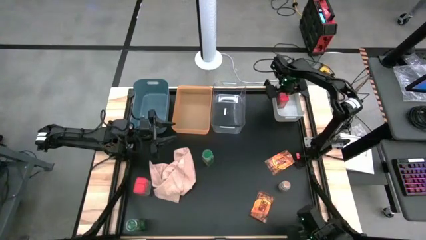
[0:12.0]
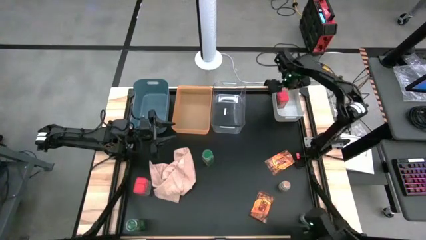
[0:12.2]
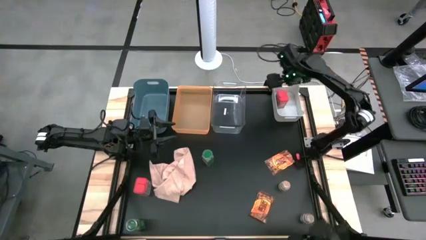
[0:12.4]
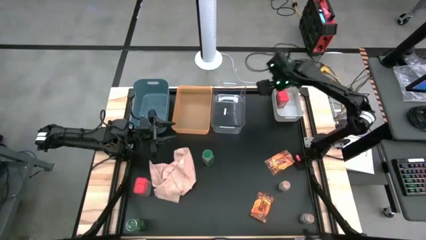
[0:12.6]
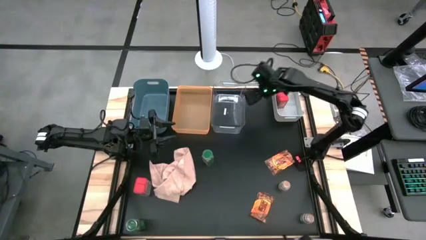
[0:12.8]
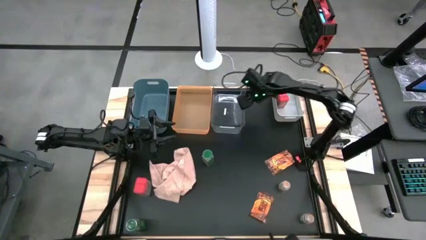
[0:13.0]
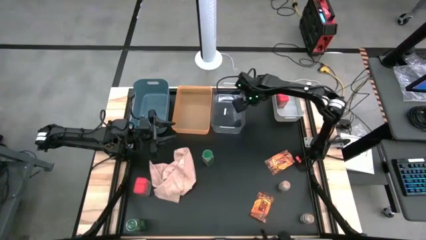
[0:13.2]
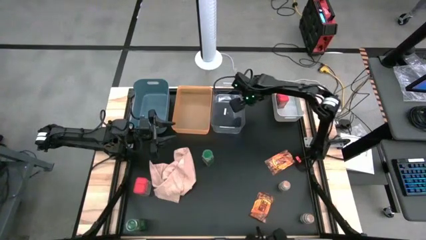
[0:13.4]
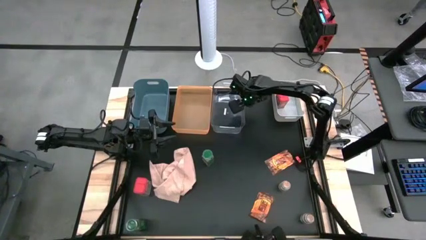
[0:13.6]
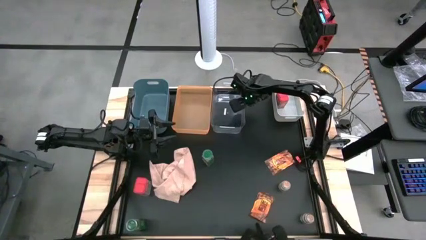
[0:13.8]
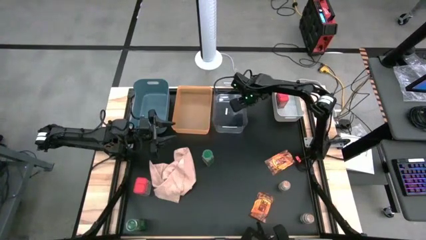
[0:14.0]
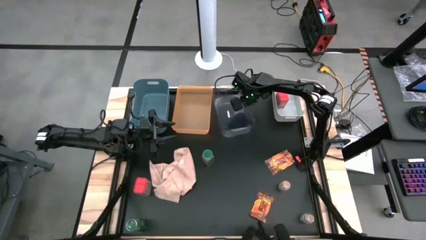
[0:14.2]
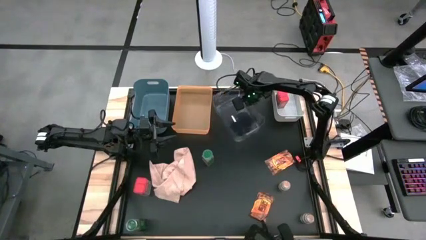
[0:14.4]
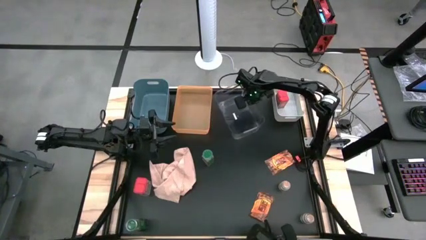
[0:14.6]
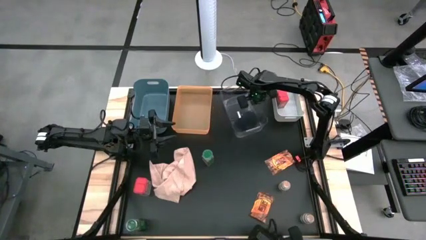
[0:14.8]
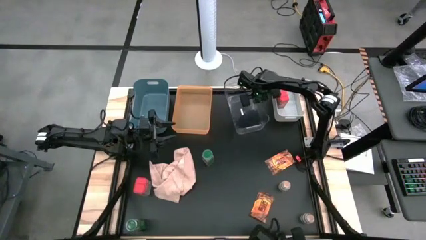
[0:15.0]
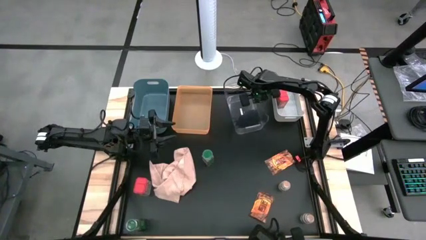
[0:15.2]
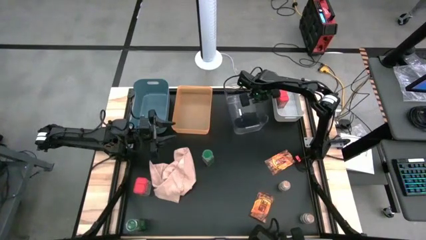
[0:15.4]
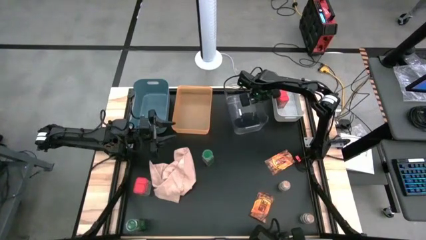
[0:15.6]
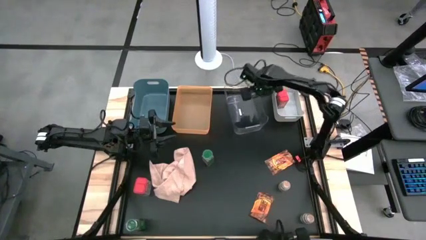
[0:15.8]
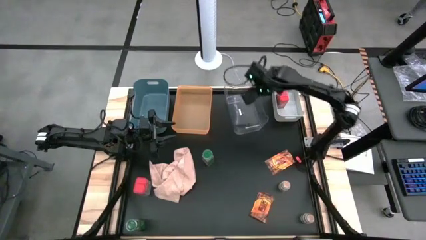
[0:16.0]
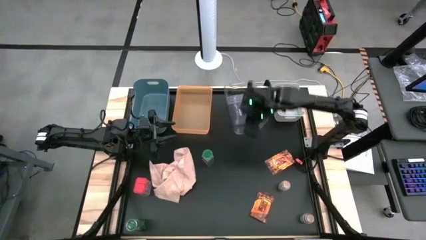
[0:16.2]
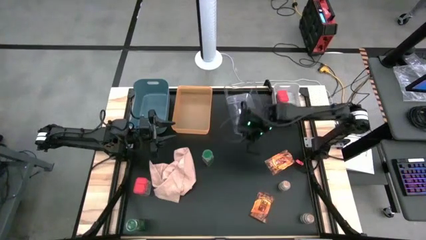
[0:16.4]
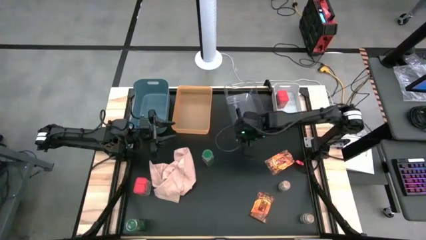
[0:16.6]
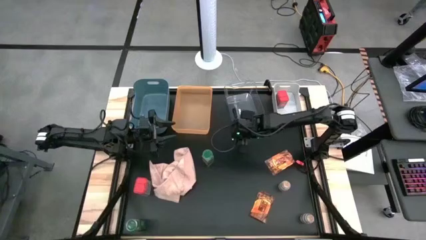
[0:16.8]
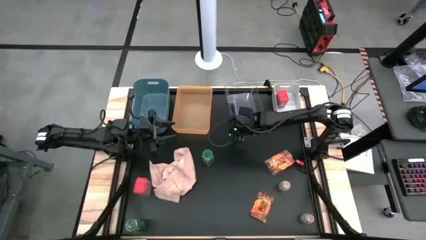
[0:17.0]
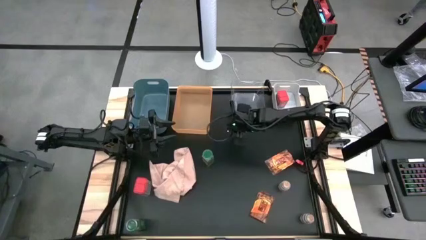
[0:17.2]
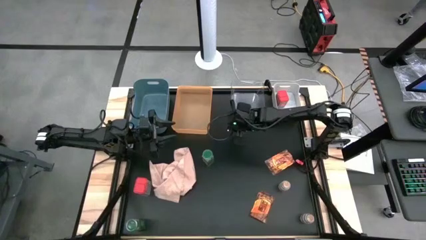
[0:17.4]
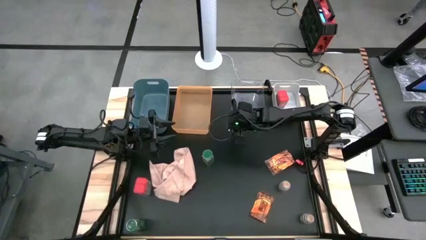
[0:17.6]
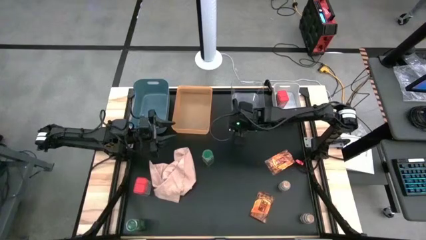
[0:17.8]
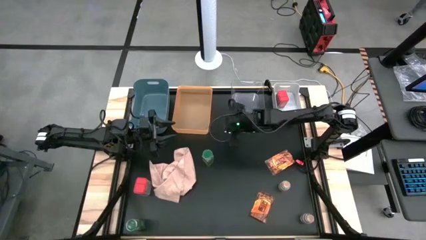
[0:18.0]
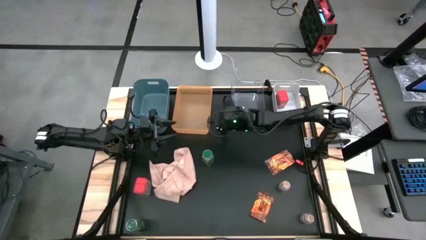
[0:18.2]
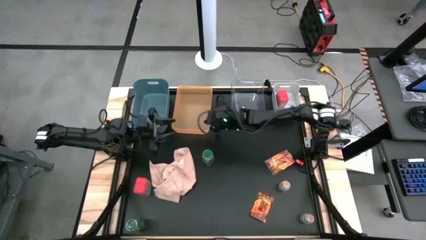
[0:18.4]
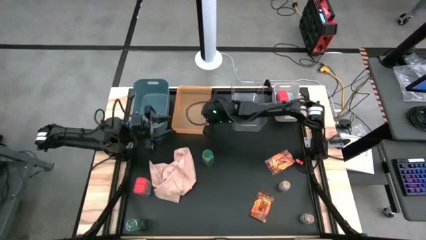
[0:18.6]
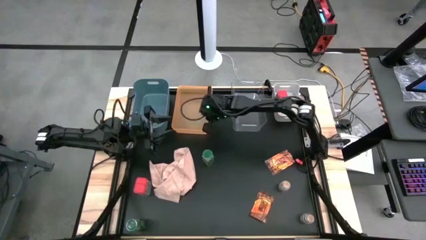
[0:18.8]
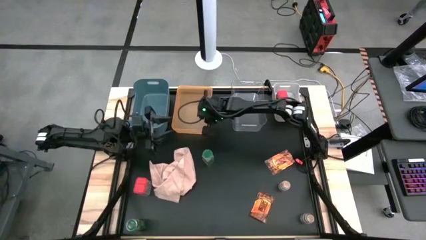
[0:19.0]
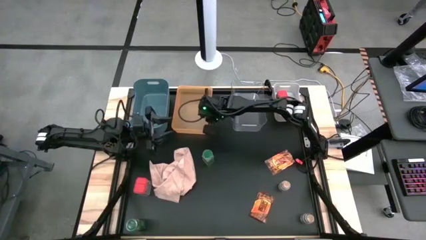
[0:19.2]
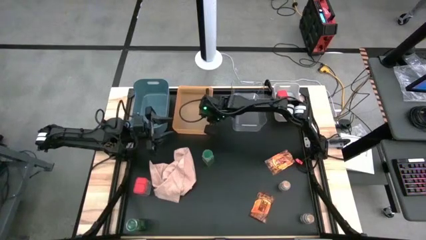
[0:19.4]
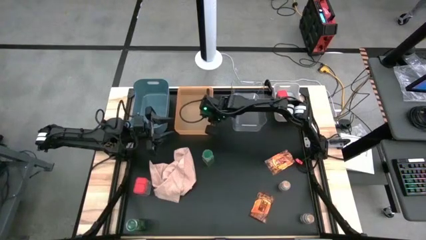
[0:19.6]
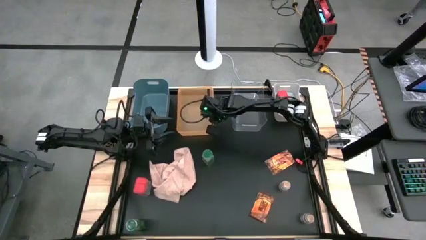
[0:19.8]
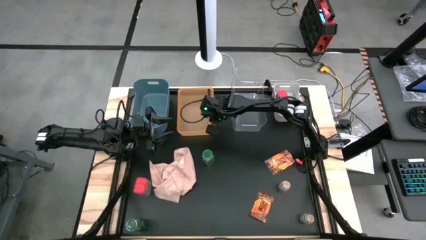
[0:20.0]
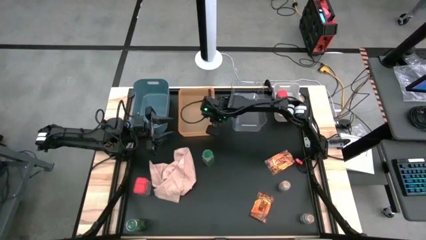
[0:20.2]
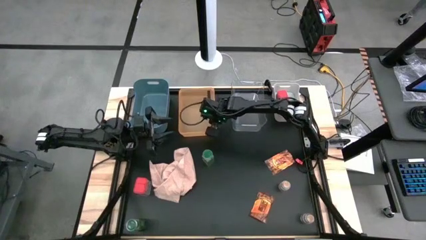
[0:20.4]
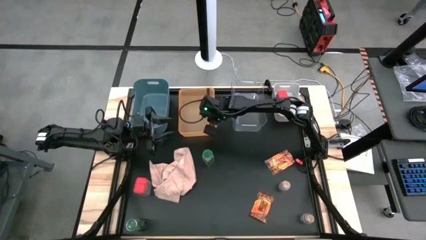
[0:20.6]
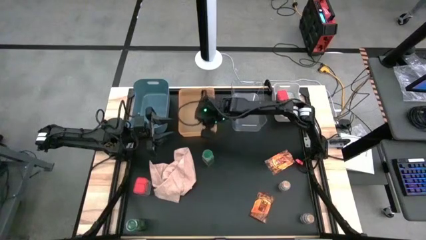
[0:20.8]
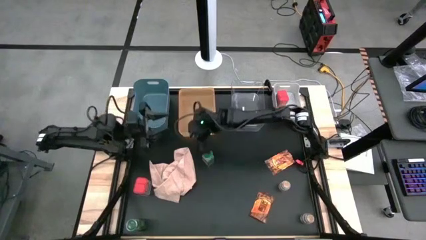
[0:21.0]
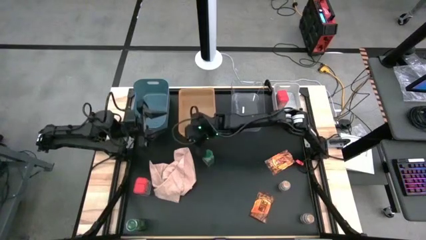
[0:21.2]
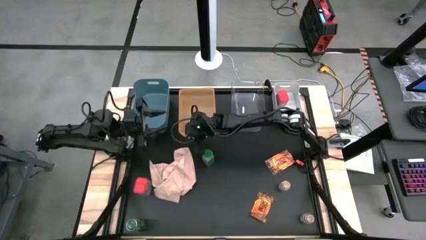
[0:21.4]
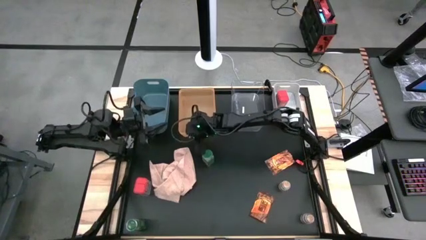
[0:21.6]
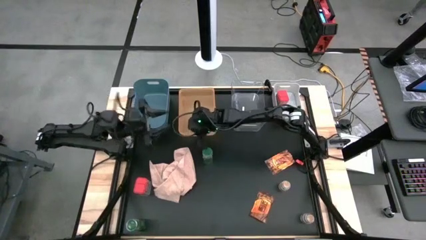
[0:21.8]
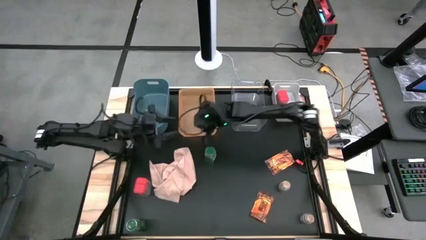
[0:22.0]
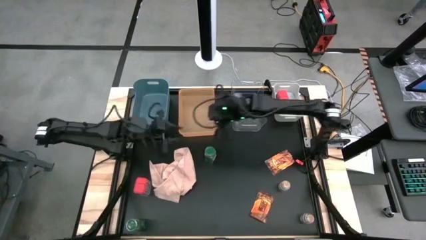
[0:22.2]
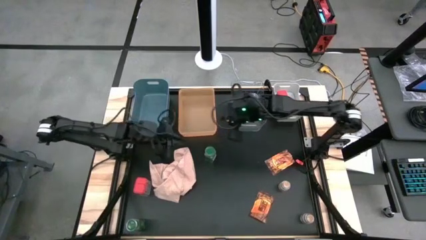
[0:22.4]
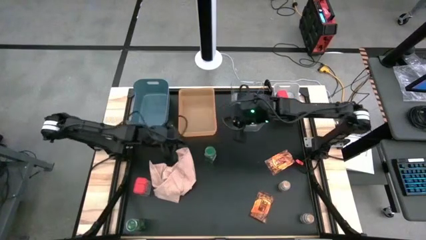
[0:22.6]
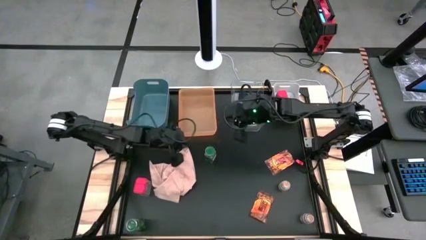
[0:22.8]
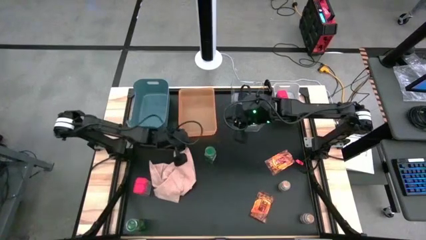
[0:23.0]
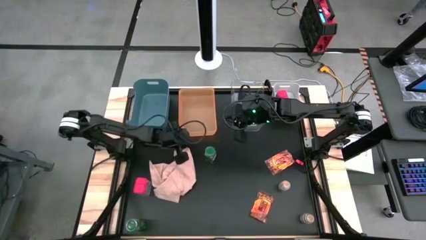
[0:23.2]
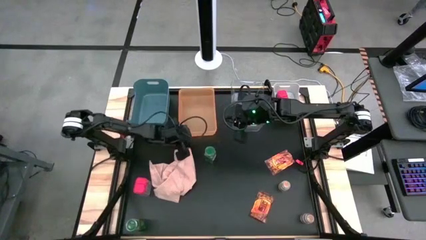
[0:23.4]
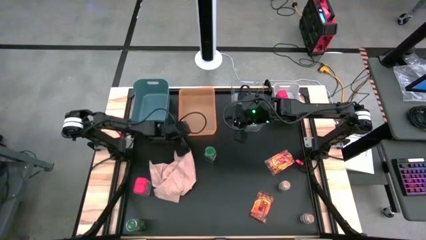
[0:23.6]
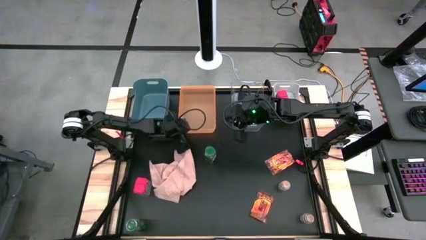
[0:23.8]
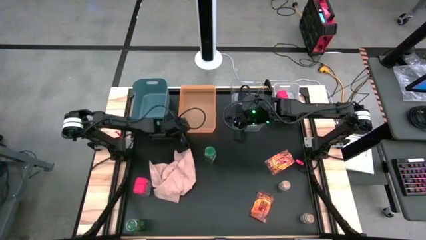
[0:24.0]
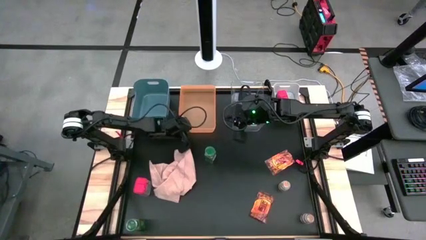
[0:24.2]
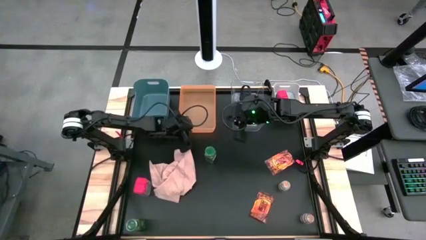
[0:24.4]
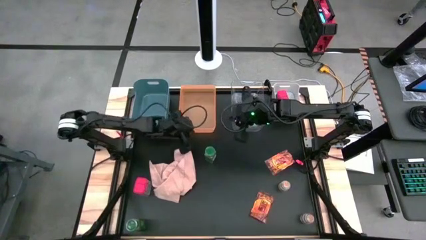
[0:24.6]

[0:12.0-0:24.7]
Task: Sort spices by type
Adjust the bins
